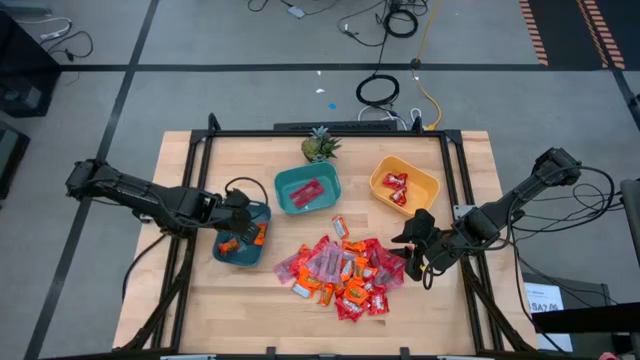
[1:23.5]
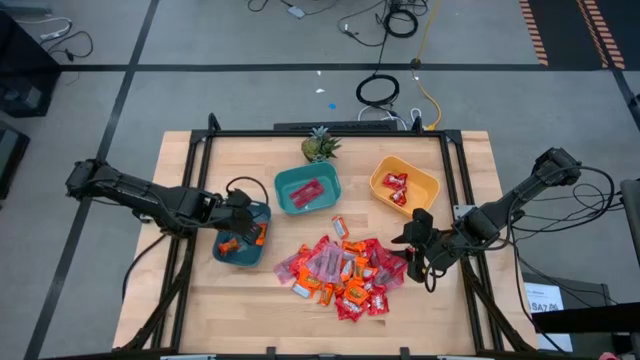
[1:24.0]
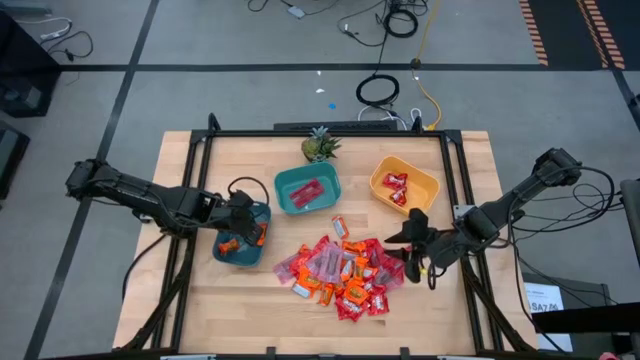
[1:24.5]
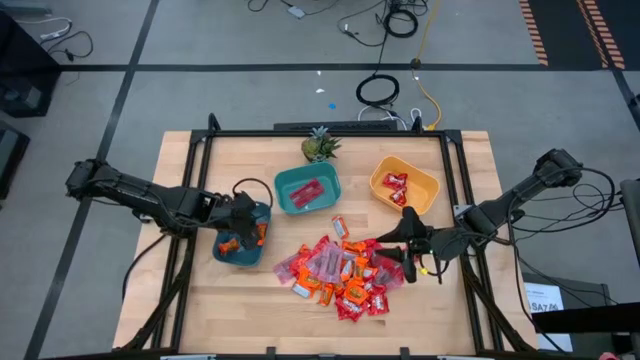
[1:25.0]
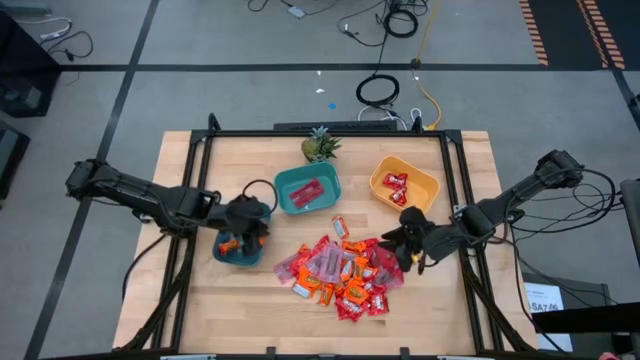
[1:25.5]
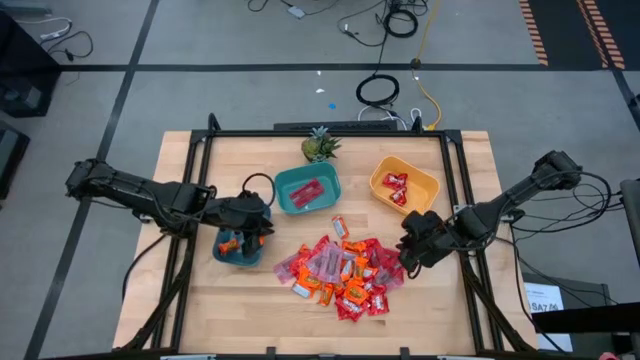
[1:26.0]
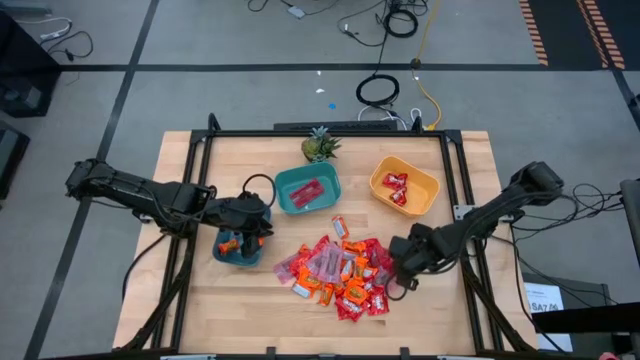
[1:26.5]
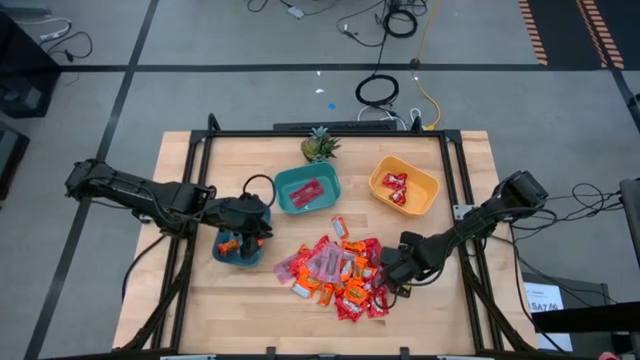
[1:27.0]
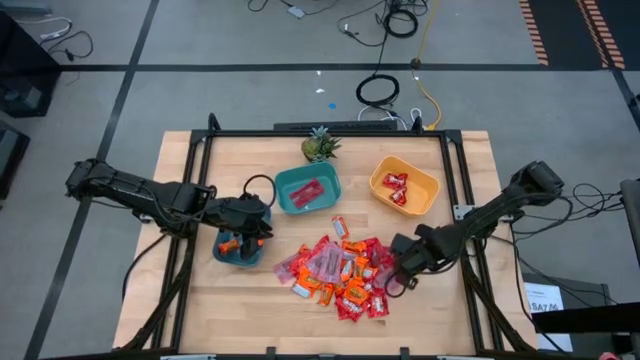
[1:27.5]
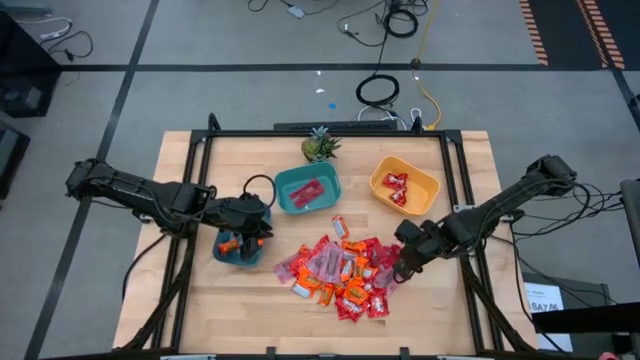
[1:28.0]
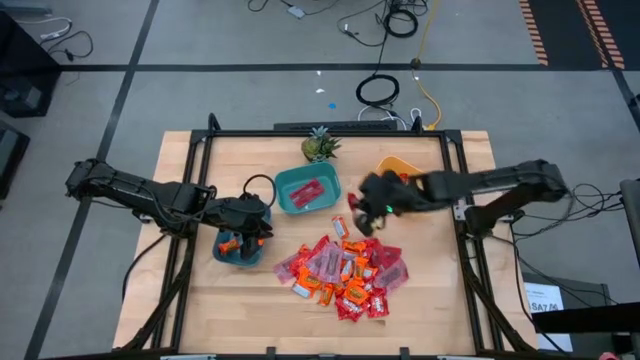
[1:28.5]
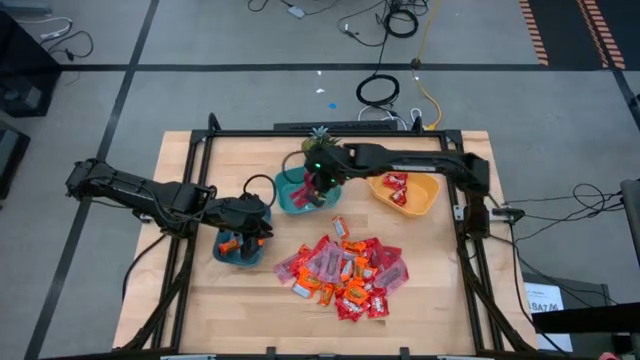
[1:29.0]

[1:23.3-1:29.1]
Task: Sort candy
Put the pink candy into the light blue bin

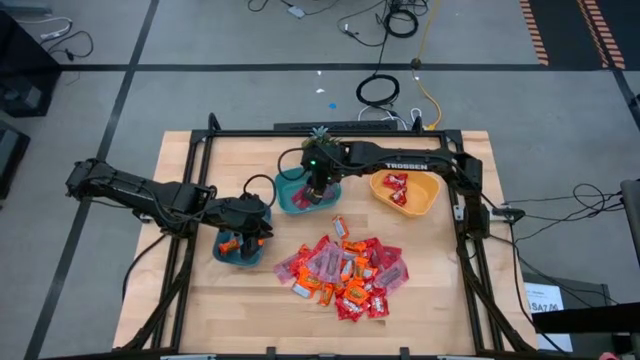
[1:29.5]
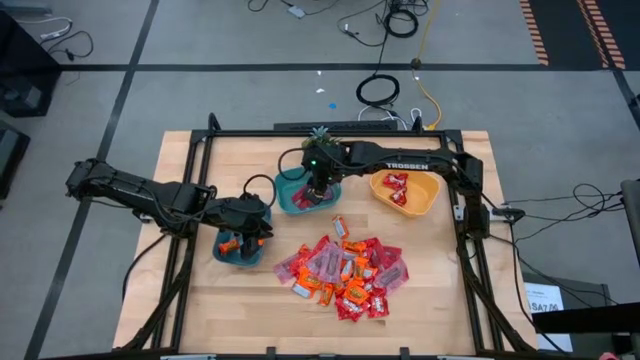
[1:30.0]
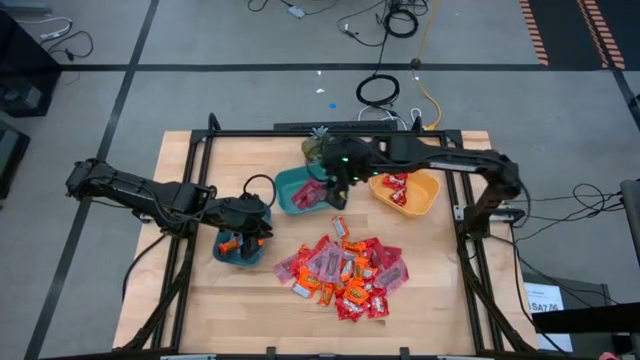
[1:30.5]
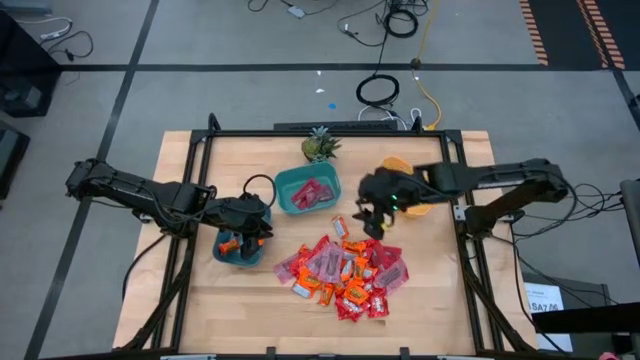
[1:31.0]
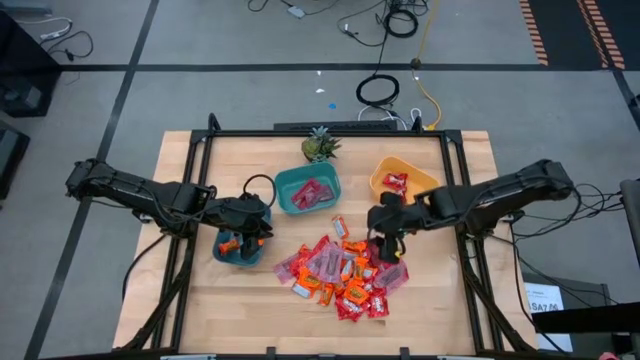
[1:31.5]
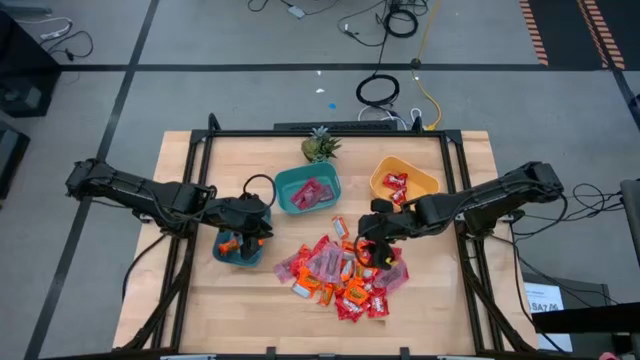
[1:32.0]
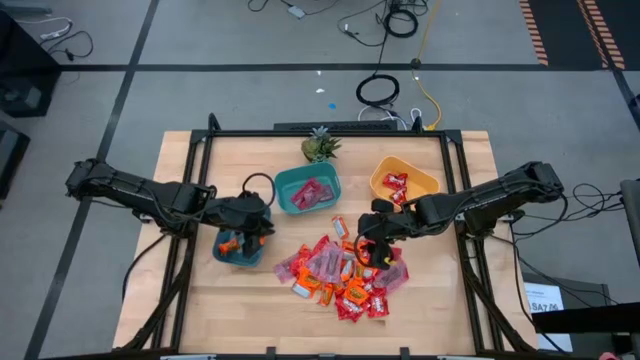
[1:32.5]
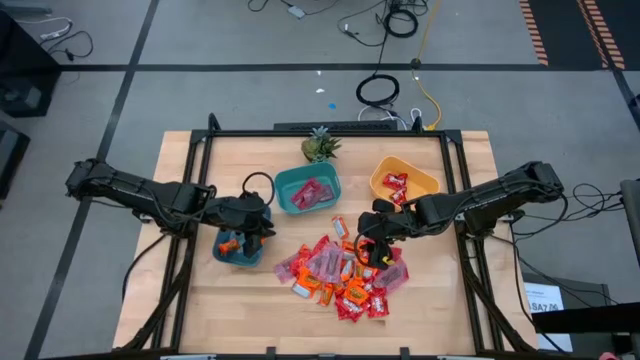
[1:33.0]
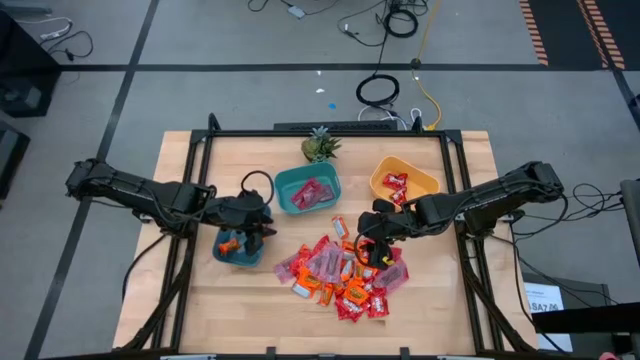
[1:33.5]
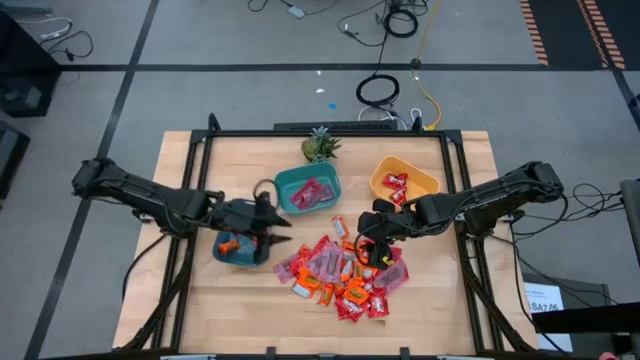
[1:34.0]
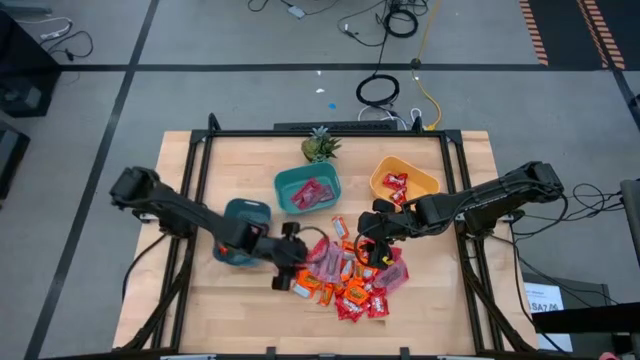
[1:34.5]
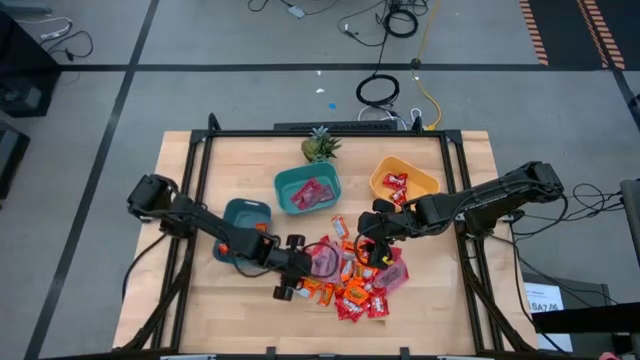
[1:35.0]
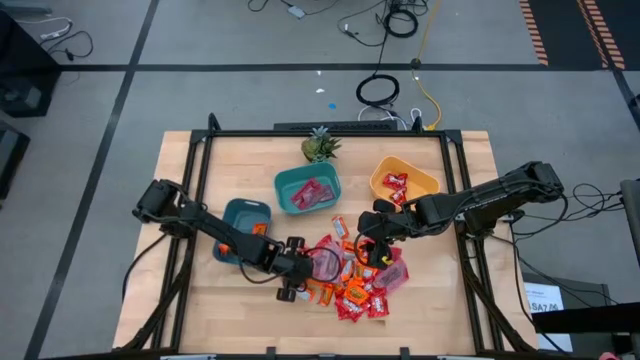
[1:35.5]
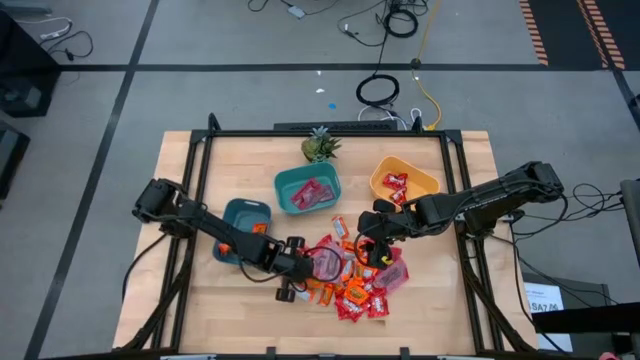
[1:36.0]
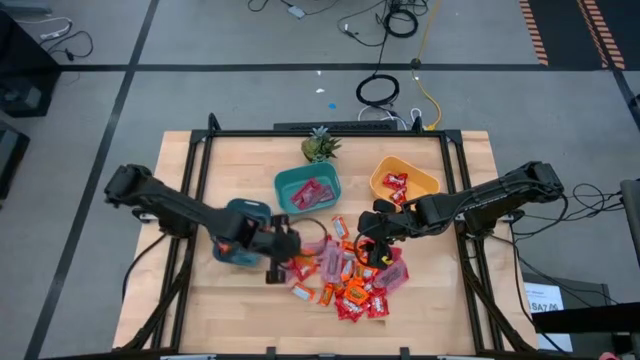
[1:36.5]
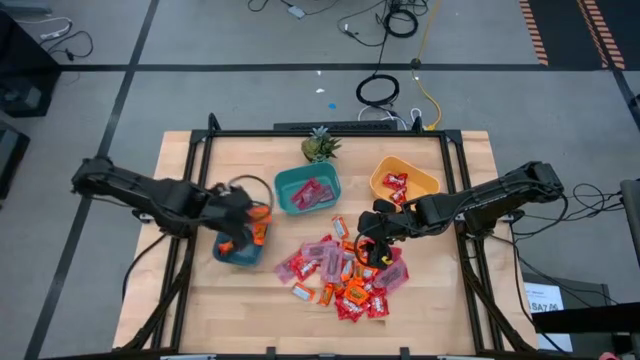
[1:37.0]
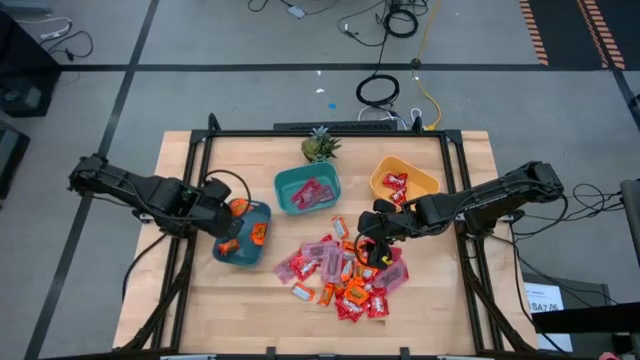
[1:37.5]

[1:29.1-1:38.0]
Put the orange chocolate into the blue bin

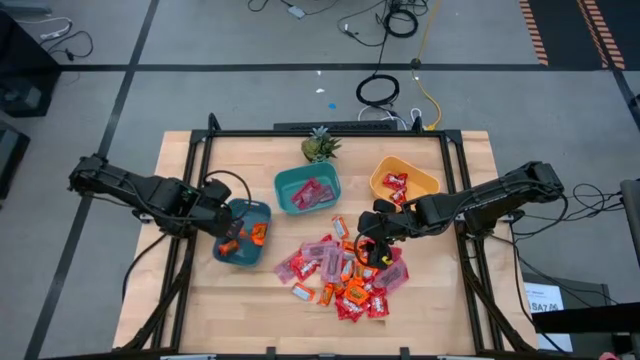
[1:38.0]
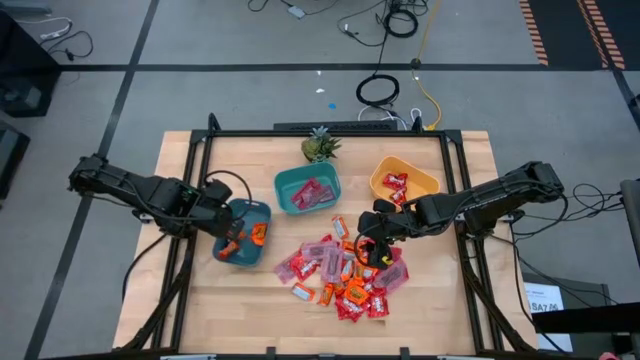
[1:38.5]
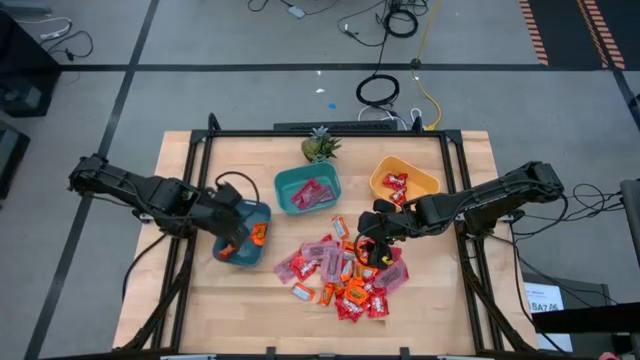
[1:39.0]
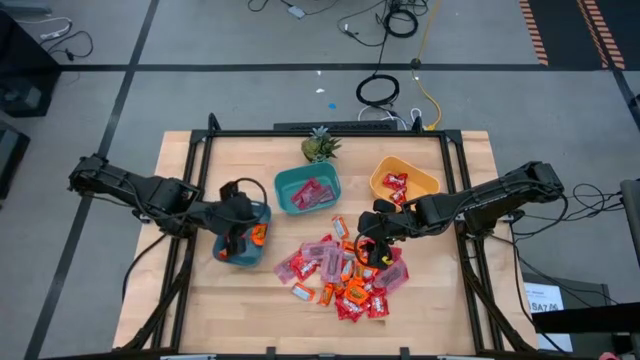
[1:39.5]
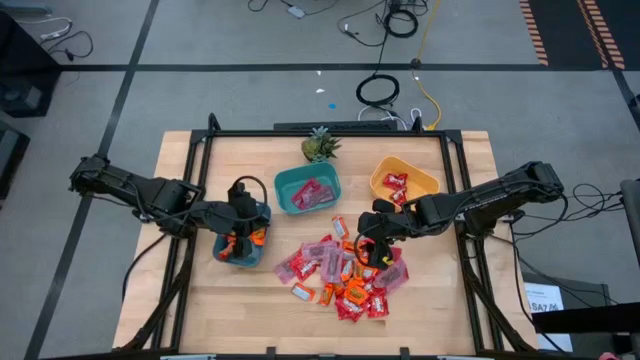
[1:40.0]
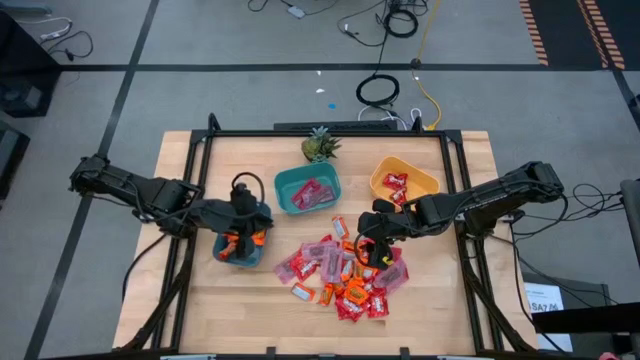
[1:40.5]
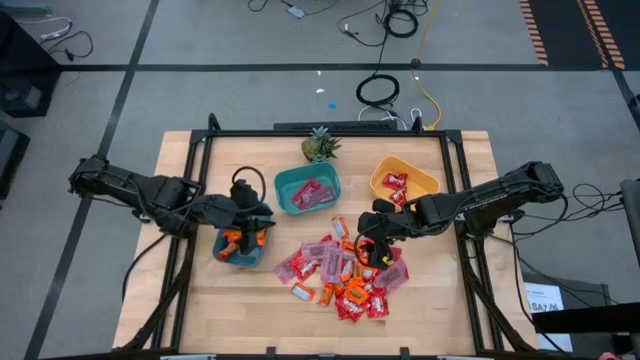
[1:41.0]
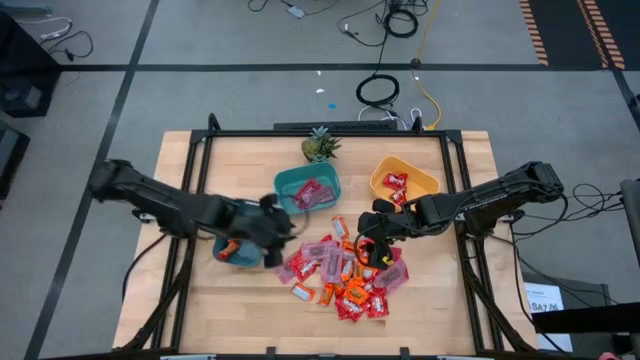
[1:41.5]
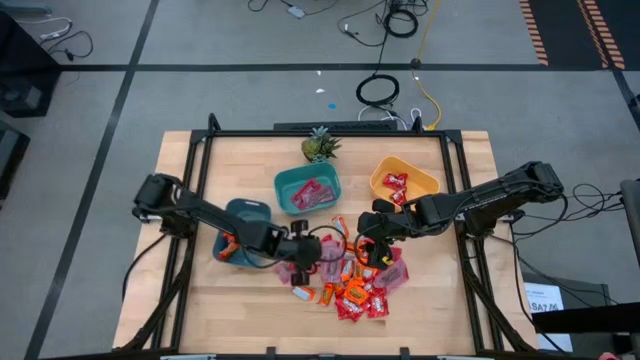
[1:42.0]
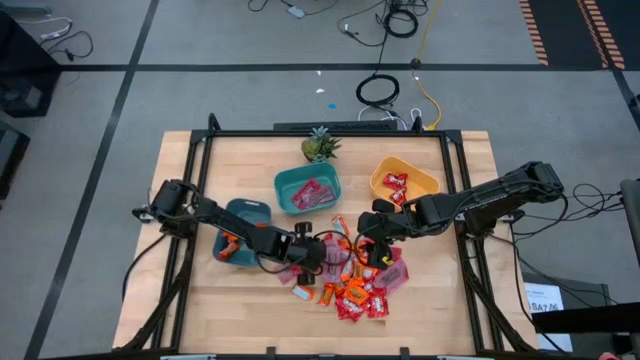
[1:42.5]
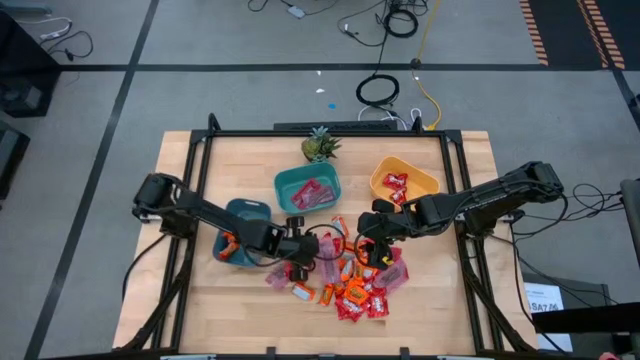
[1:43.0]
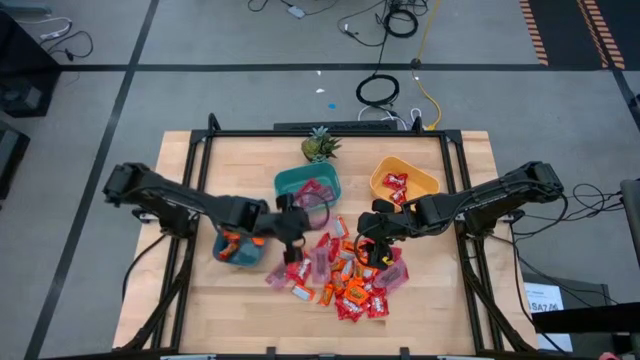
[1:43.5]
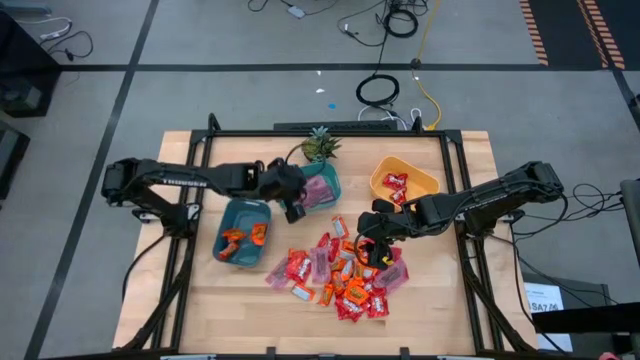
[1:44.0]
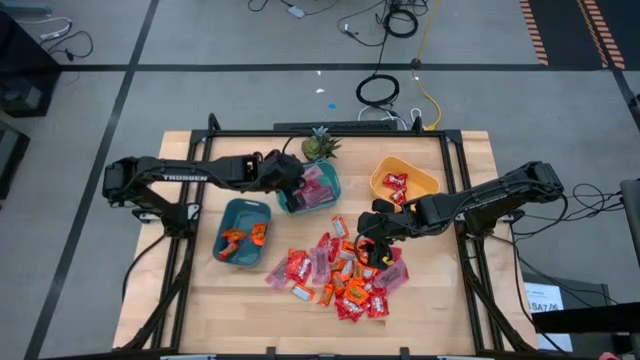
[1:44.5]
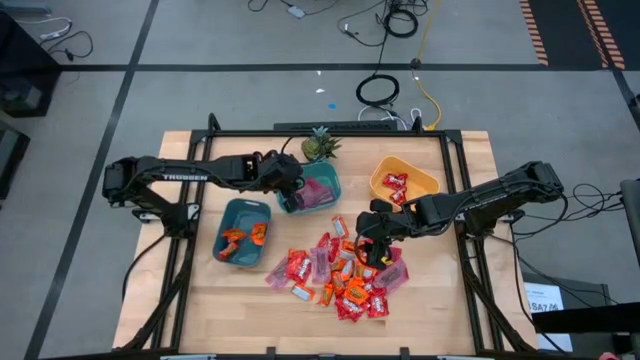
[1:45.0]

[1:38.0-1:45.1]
Put the pink candy into the light blue bin
